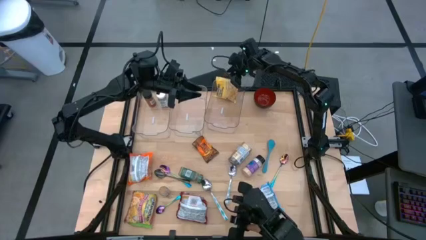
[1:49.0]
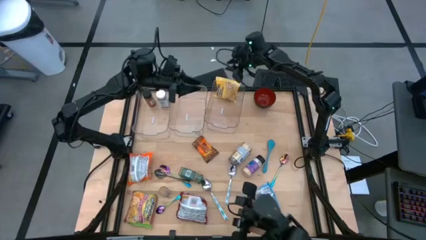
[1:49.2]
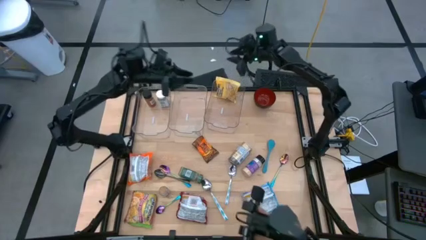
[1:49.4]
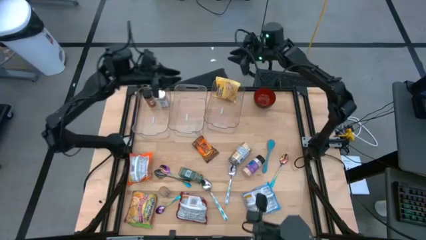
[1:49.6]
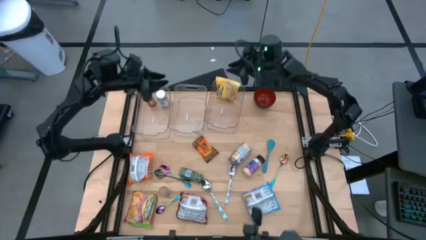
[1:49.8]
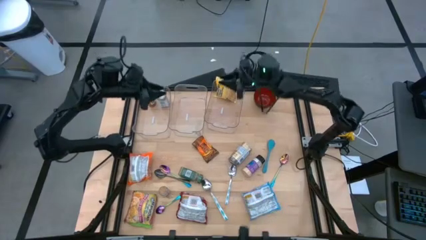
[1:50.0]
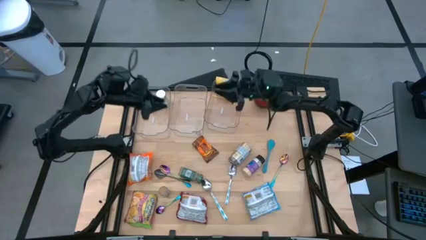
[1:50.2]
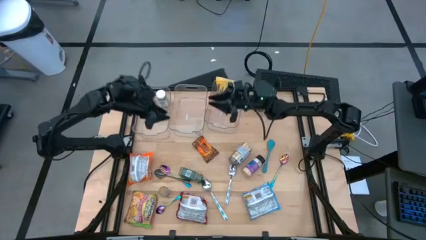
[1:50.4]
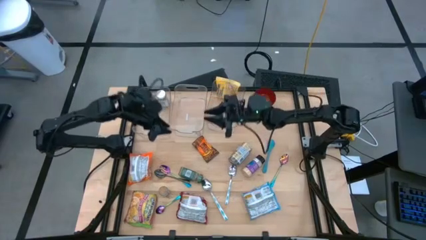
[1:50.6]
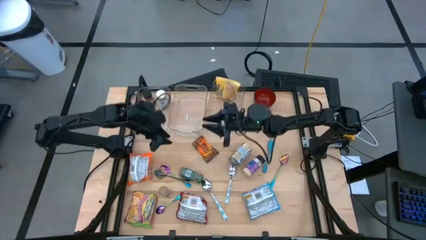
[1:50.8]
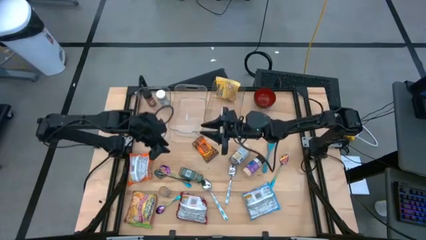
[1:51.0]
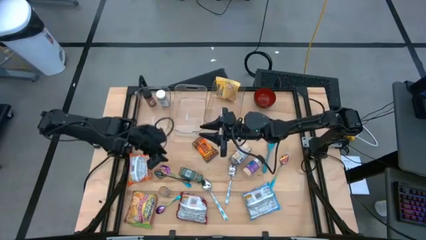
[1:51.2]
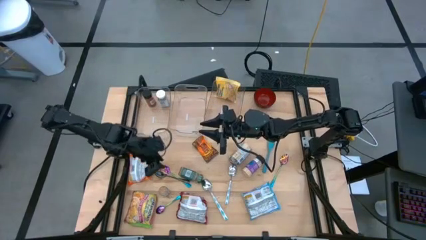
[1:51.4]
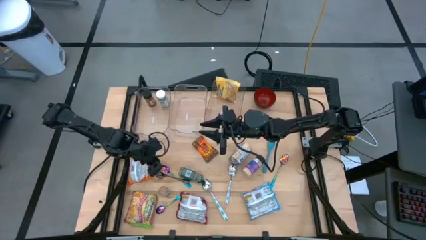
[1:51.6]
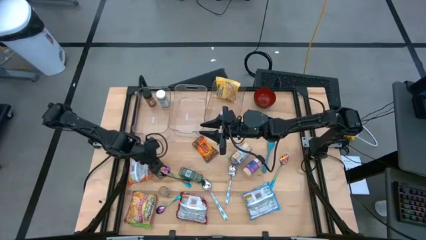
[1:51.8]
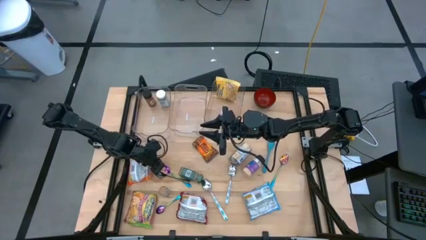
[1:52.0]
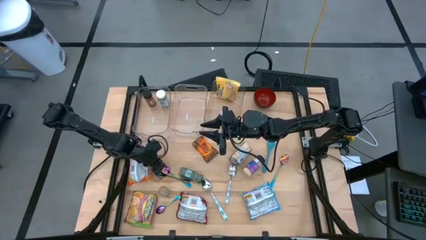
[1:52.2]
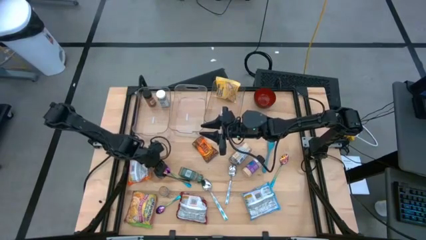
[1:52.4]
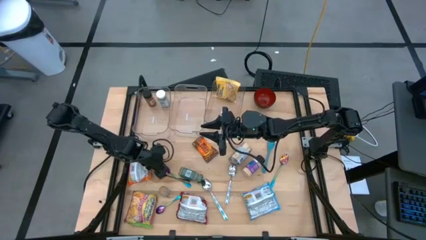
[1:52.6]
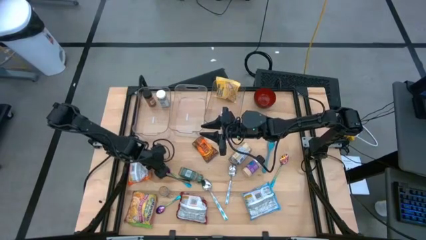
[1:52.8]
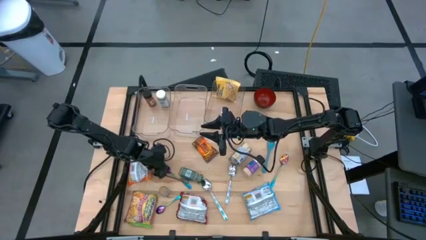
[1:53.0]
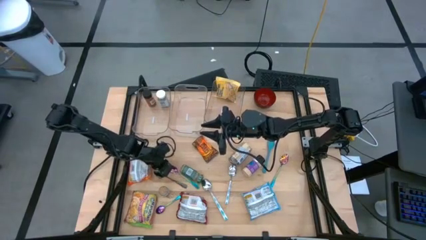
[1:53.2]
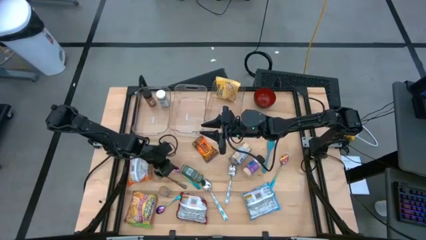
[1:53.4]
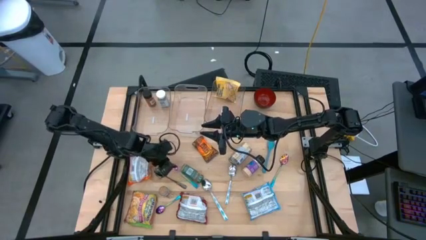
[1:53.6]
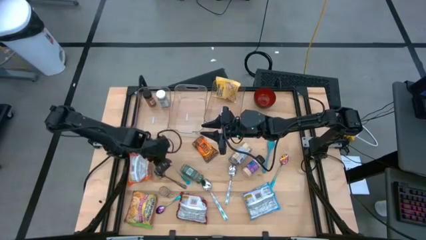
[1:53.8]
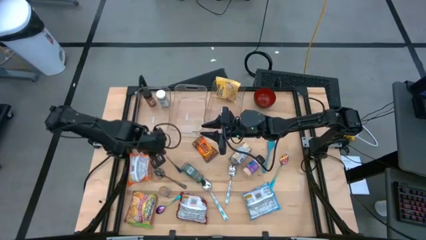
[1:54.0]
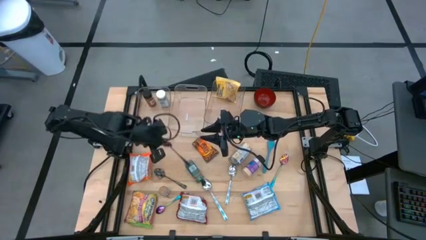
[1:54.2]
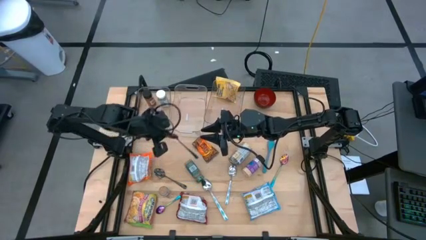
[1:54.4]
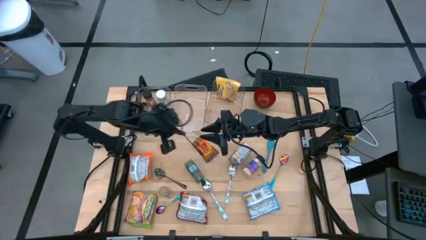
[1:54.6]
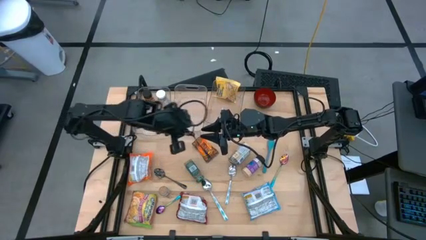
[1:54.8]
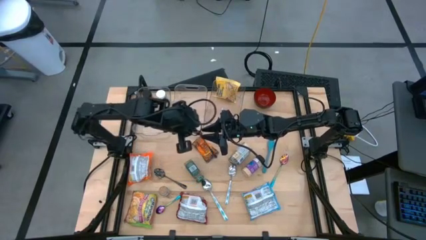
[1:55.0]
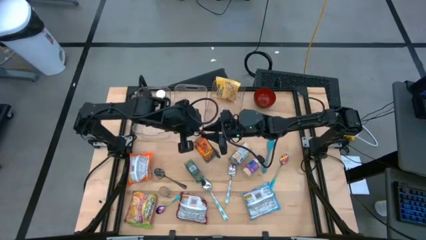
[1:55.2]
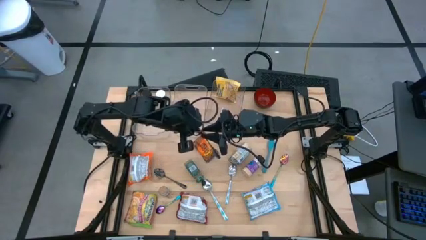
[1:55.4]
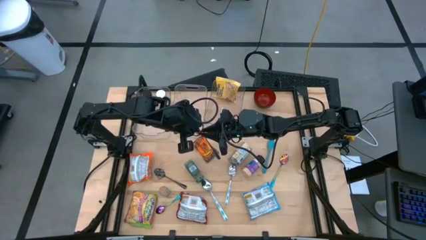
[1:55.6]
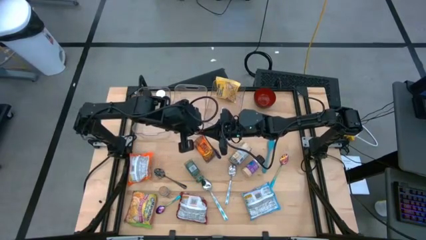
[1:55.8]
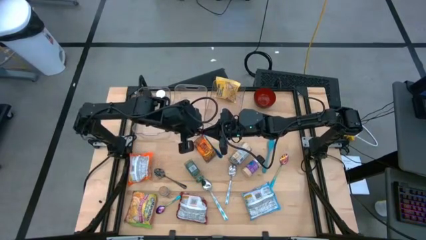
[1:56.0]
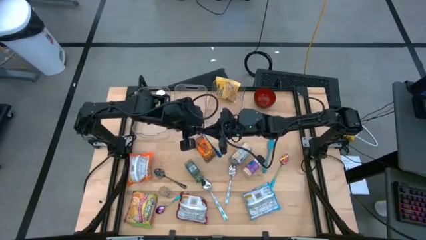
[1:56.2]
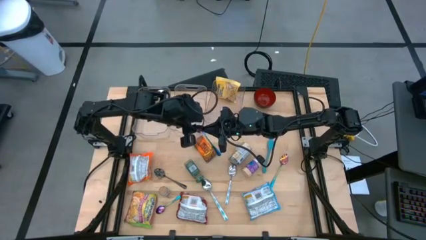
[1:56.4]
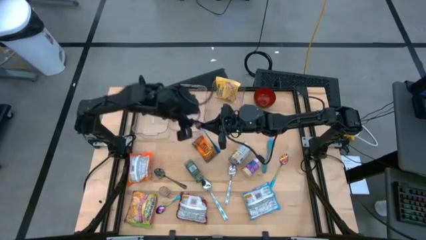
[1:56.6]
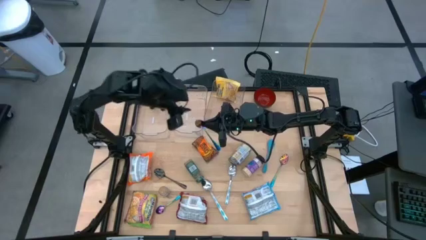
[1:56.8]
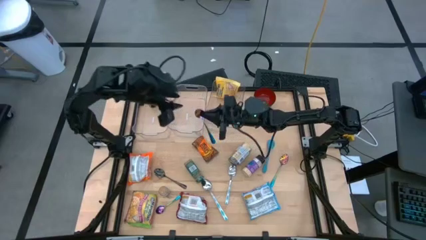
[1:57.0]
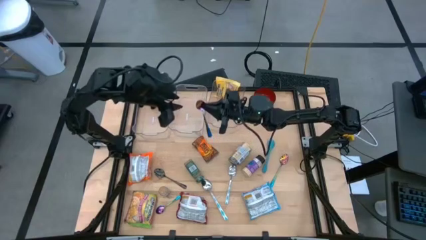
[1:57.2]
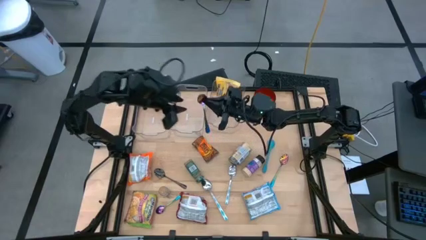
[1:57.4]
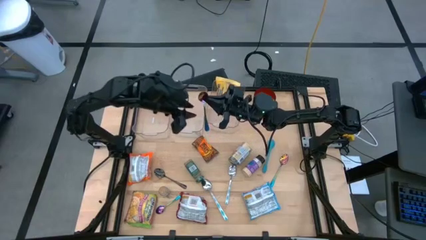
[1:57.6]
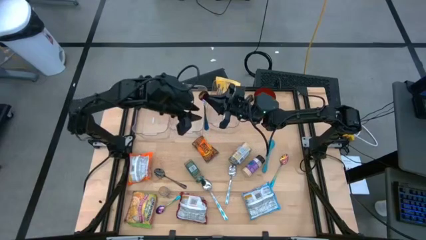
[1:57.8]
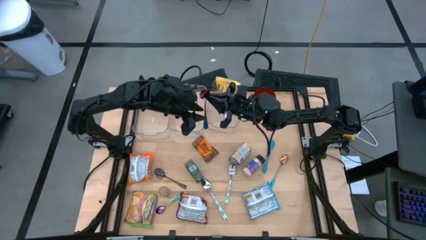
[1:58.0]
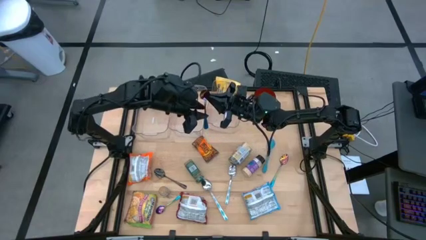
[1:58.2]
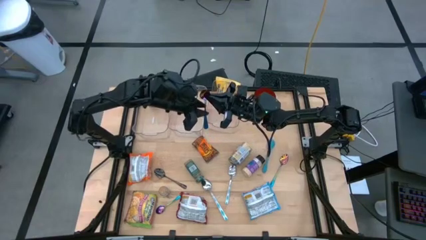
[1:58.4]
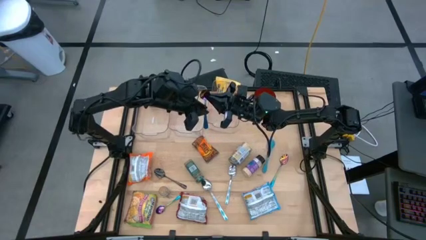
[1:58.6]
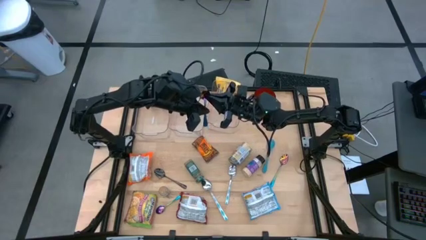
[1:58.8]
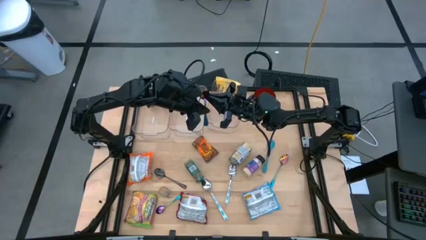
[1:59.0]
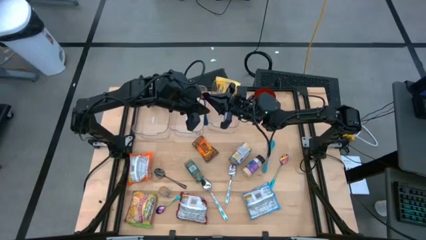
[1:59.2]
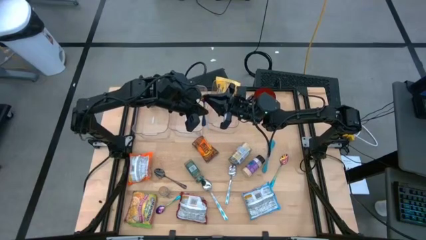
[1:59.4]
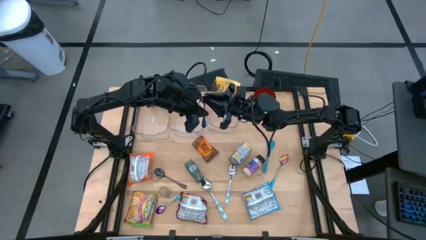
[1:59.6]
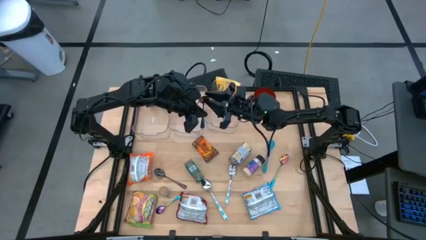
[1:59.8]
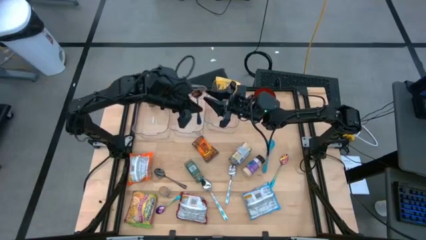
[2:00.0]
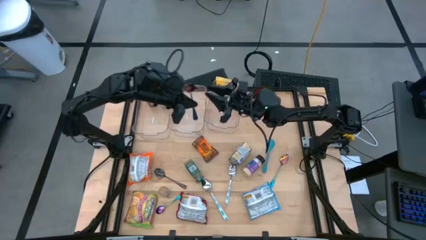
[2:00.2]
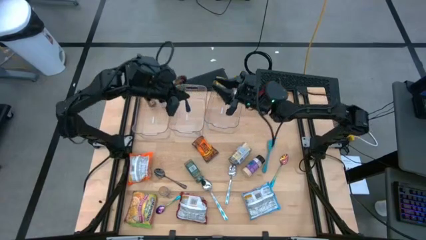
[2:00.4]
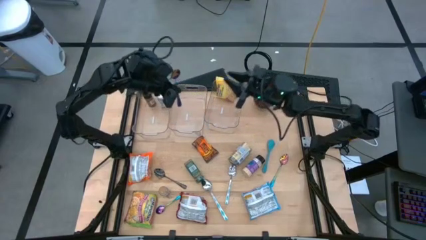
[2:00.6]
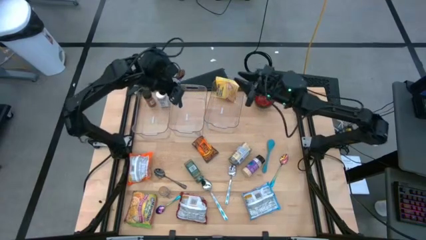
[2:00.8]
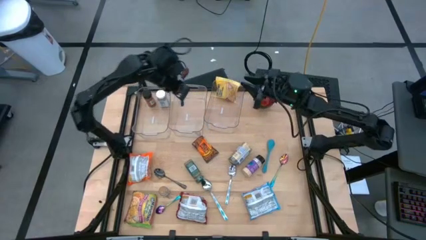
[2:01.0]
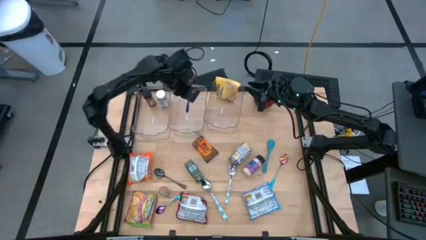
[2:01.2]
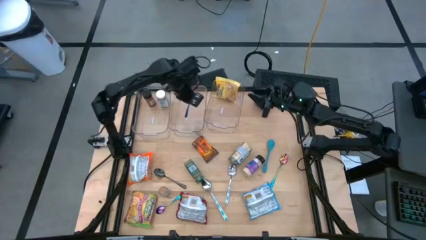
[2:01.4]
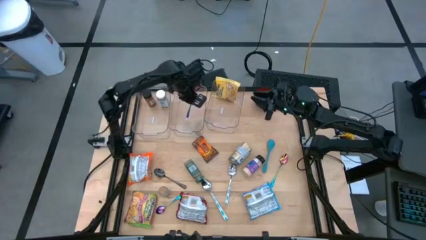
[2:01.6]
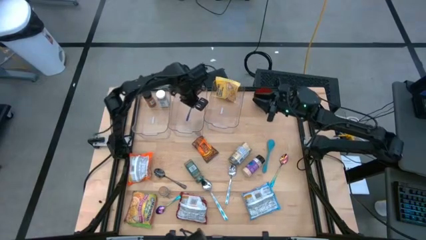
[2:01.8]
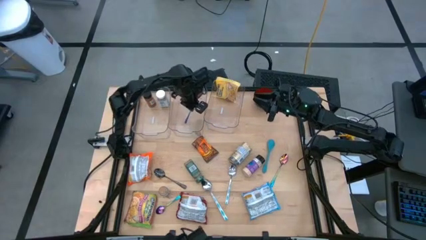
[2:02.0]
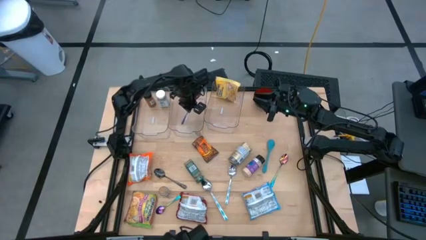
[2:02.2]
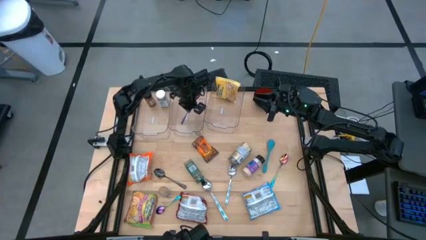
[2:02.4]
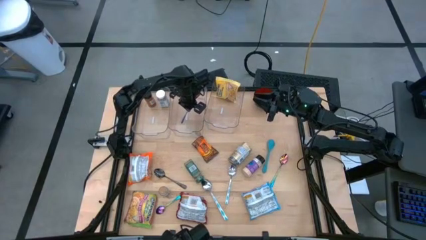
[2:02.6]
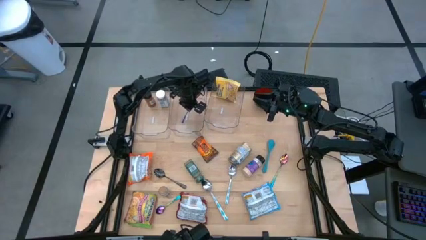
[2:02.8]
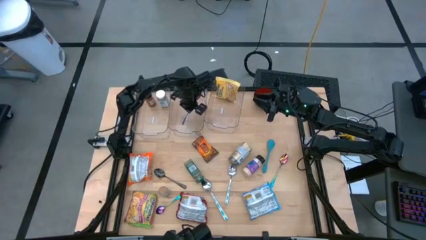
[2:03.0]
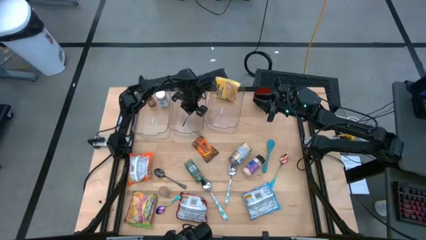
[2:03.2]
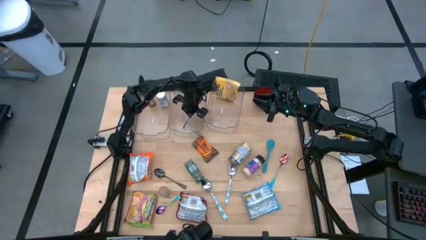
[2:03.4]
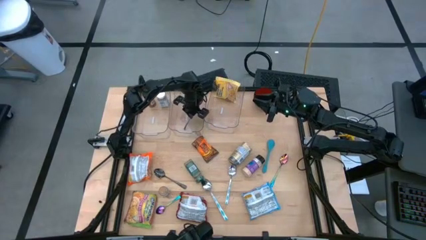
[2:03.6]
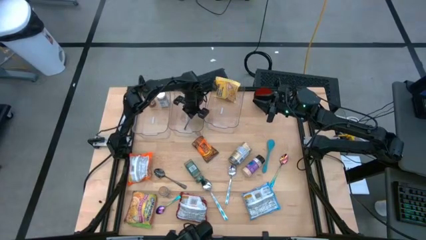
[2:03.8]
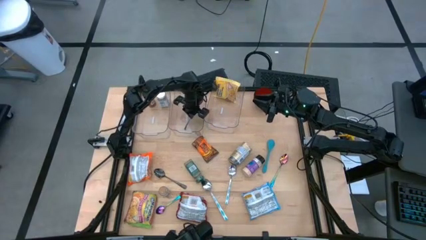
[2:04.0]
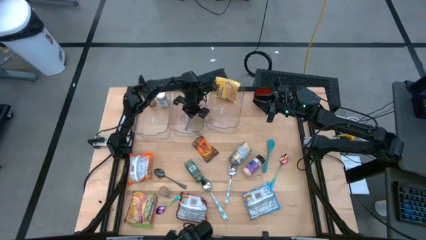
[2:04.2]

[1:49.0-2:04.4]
Task: Pick & Place Food Item
Put the top left purple and blue spoon into the middle transparent bin
